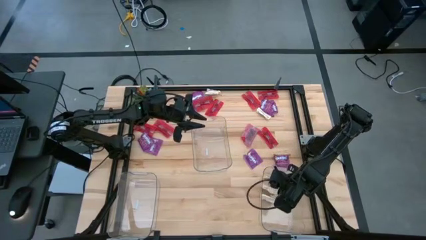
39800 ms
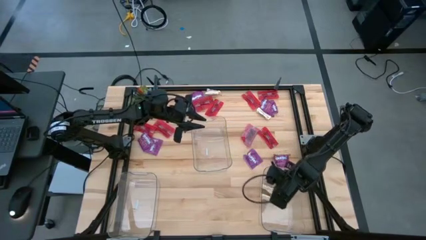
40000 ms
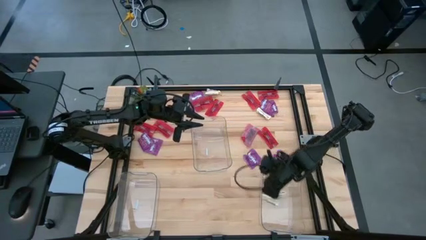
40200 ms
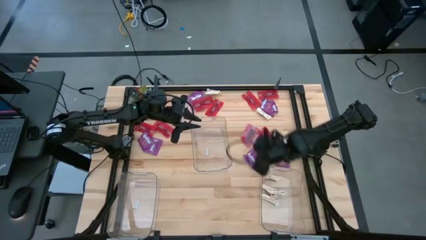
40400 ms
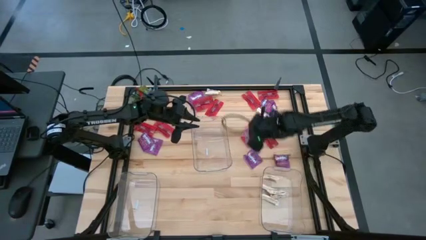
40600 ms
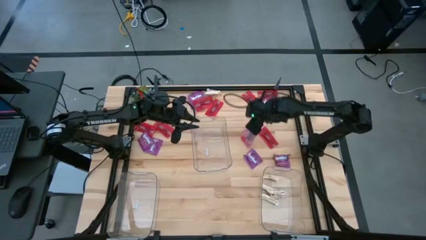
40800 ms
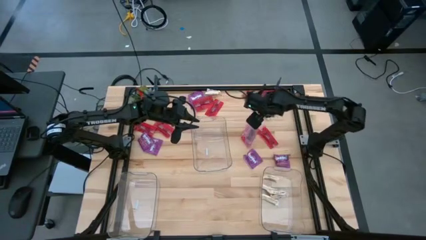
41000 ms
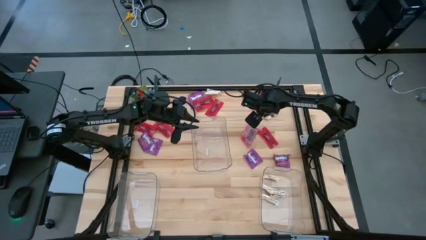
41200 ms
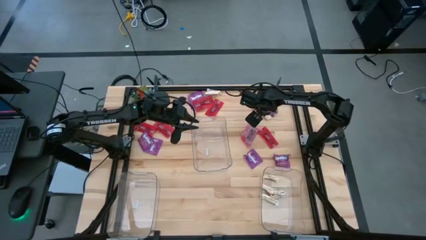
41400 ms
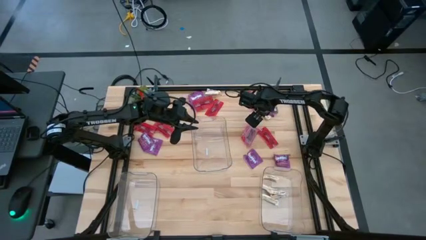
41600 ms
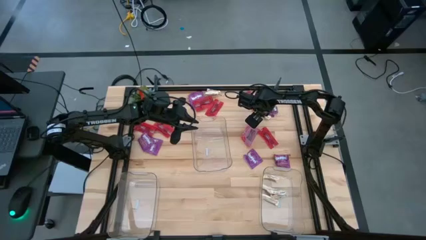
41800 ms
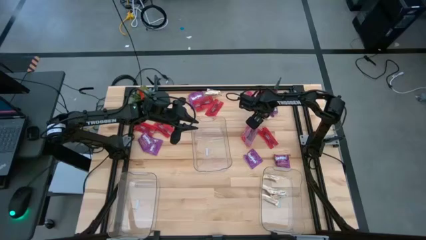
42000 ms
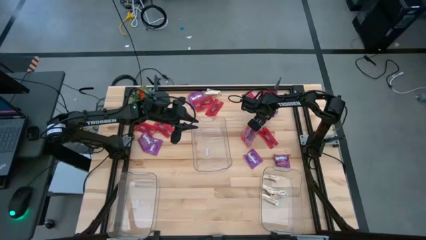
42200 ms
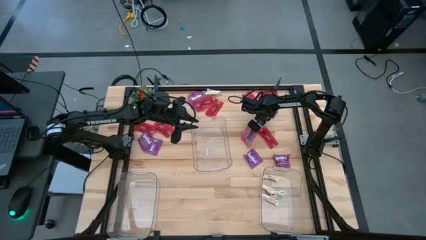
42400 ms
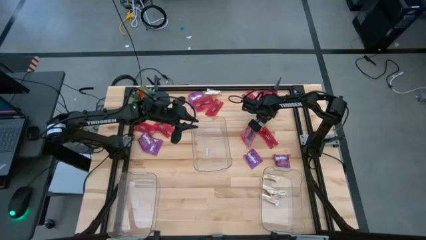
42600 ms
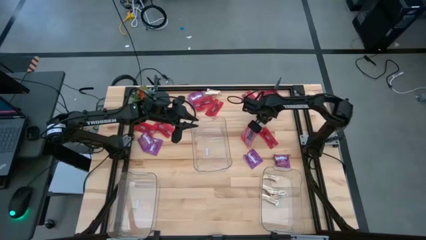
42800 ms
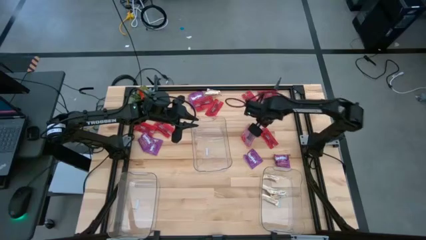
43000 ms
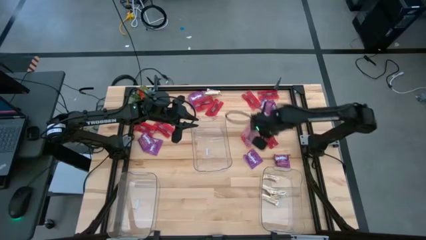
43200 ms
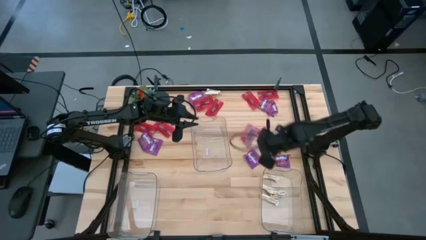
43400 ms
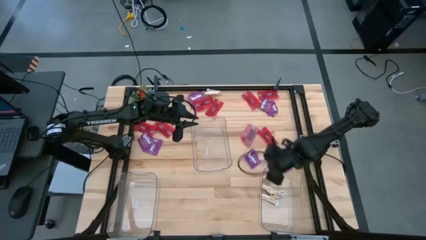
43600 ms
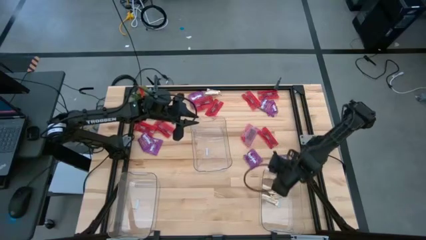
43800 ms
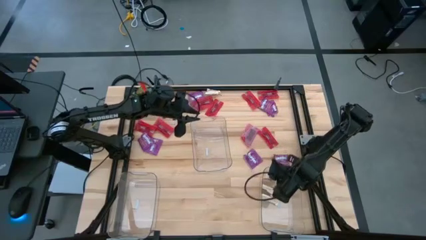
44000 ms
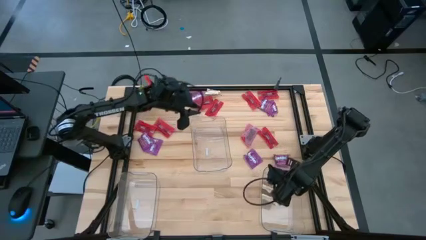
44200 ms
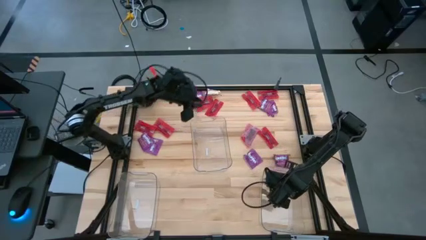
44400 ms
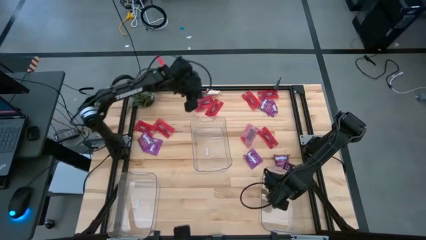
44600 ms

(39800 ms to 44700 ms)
Task: Sort candy
Put the white chocolate bar into the right transparent bin

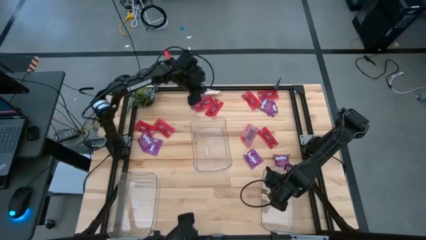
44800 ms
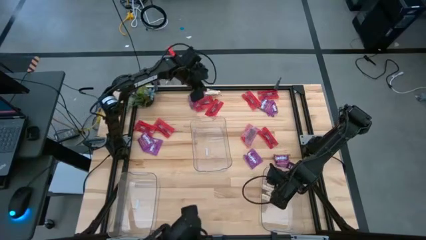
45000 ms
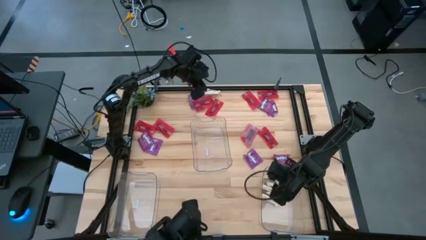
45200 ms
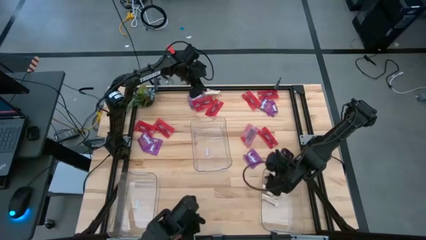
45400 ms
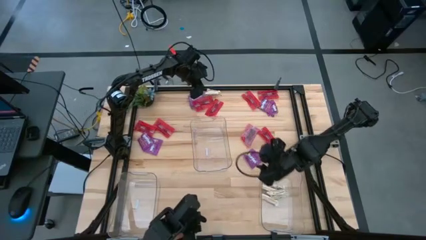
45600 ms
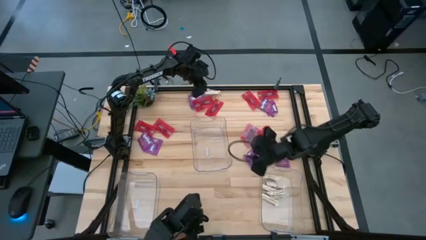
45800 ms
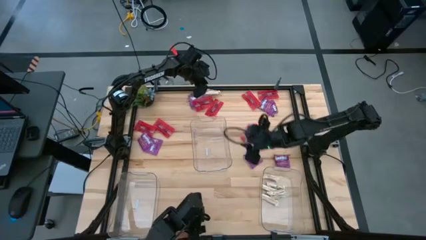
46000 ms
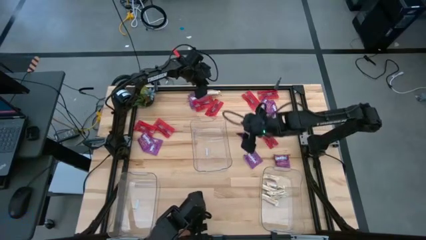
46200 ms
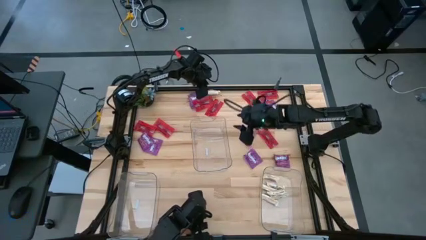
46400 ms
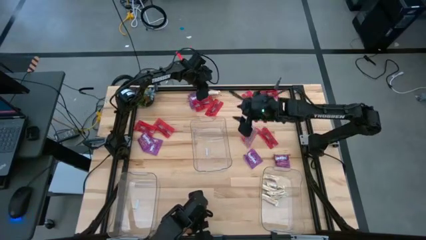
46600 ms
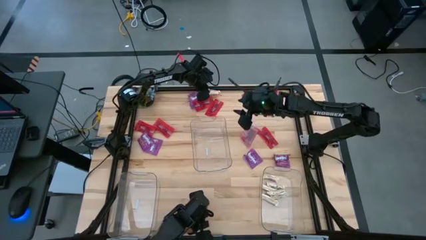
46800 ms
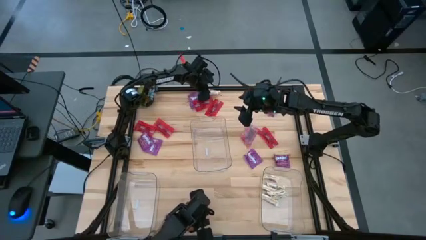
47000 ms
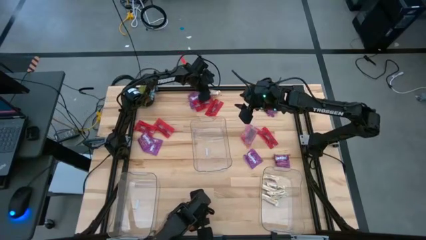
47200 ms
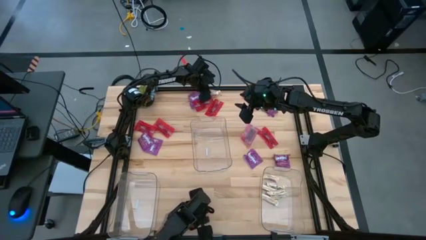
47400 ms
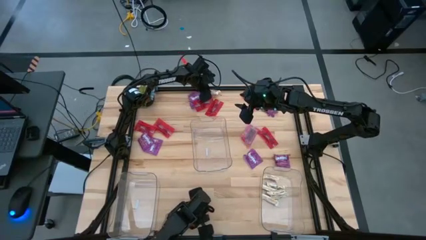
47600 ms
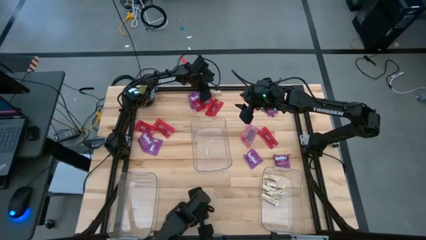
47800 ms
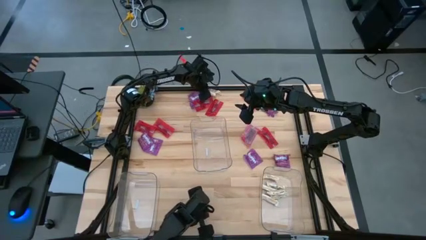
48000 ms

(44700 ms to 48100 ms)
Put the white chocolate bar into the right transparent bin

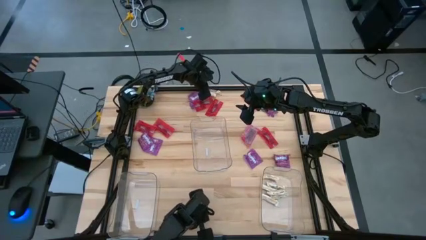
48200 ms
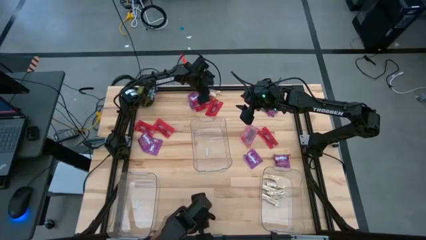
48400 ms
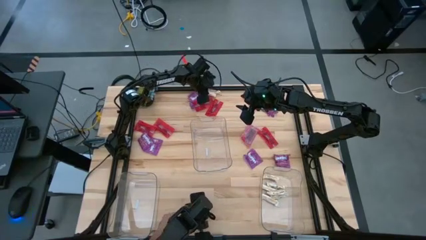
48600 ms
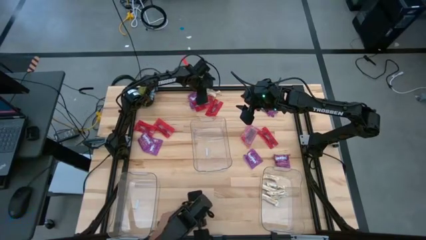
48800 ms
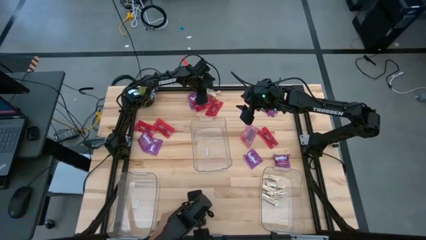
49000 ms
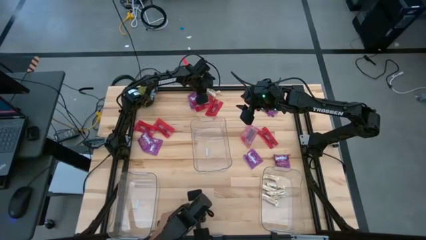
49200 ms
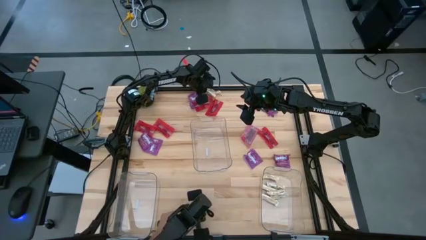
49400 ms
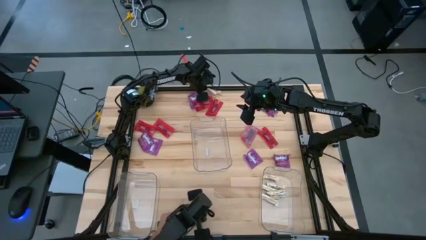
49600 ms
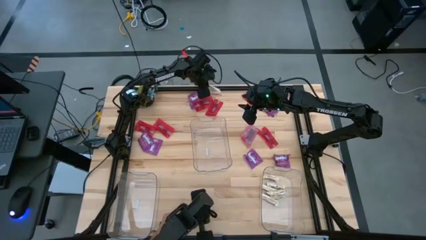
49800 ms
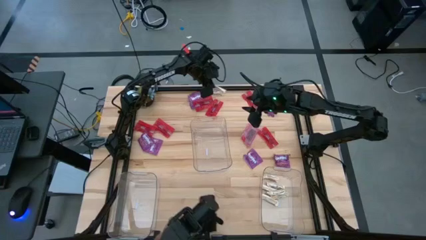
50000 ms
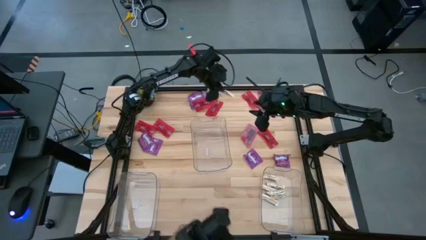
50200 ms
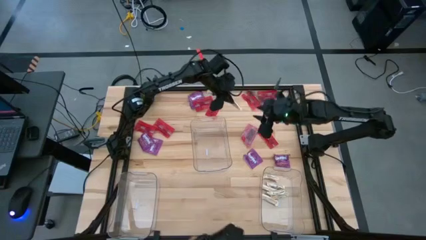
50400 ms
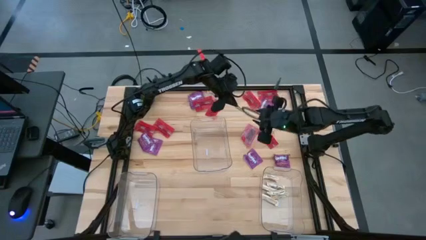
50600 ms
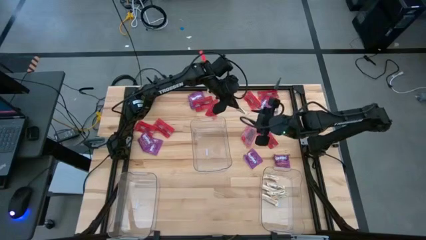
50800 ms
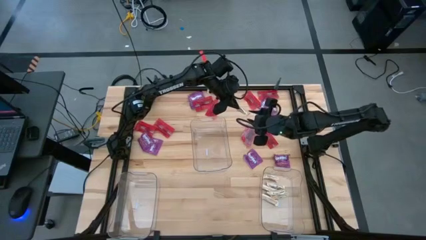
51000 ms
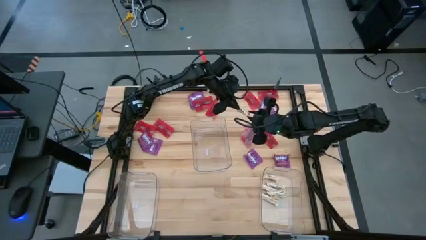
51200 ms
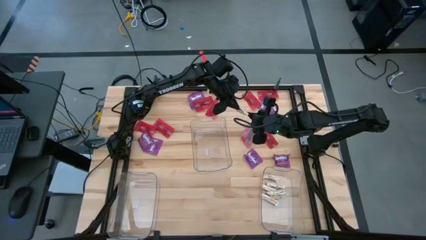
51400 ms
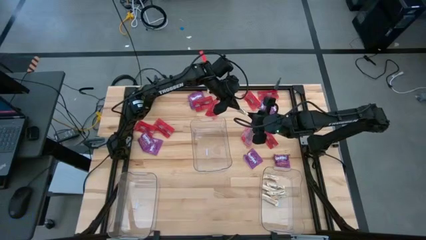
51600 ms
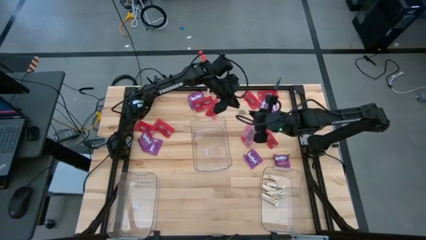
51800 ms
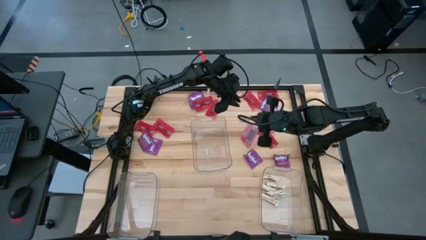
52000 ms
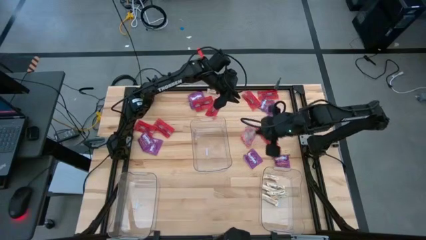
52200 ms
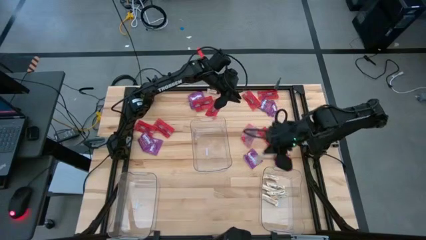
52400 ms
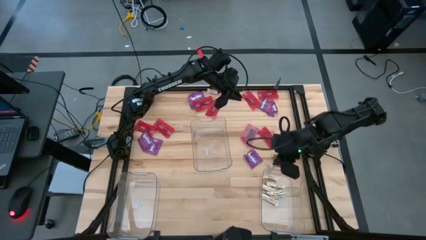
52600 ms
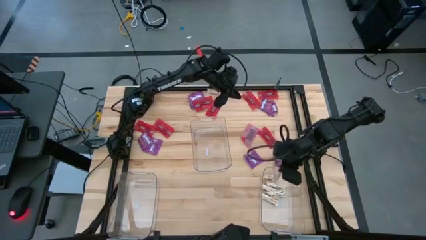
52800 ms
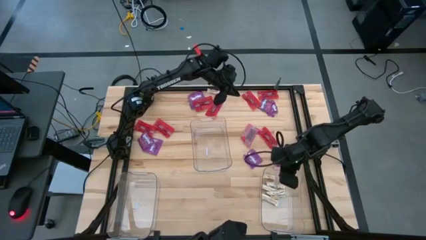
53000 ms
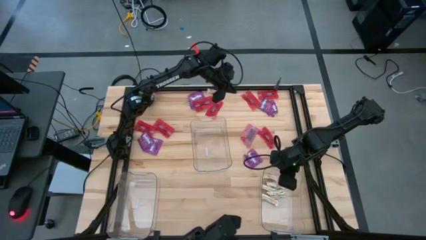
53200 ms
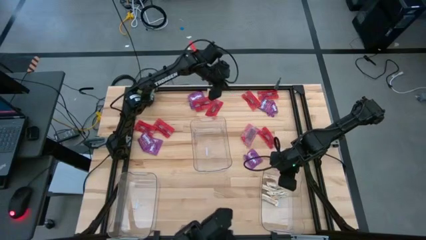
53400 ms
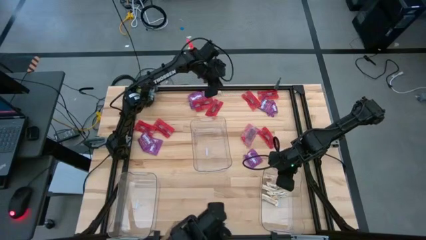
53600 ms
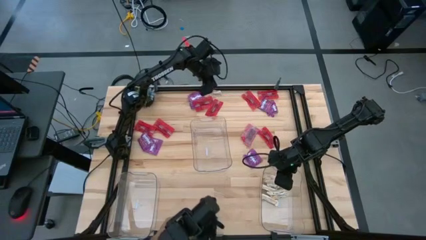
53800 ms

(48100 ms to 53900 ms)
Put the white chocolate bar into the right transparent bin
